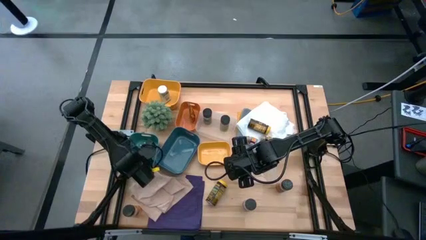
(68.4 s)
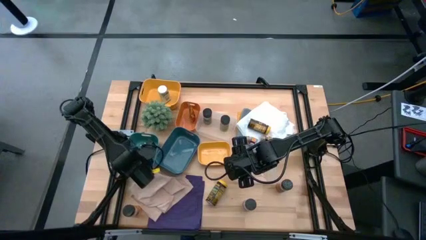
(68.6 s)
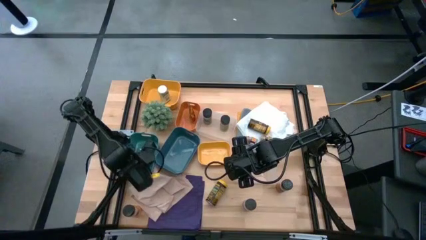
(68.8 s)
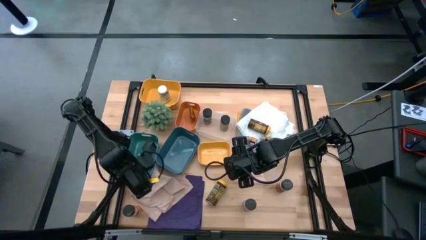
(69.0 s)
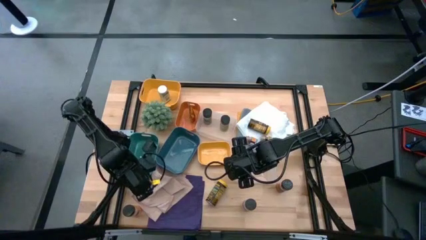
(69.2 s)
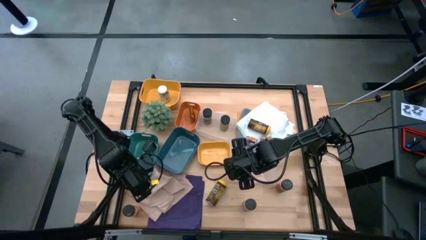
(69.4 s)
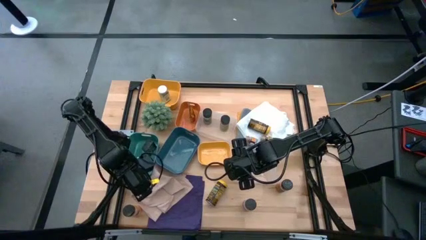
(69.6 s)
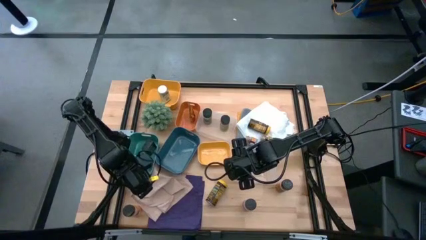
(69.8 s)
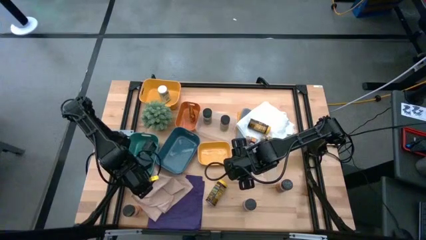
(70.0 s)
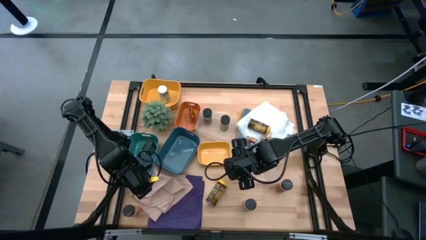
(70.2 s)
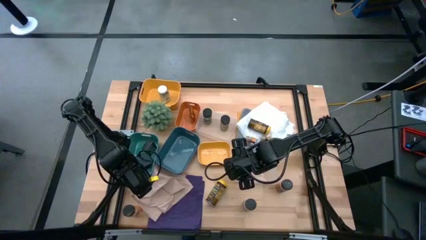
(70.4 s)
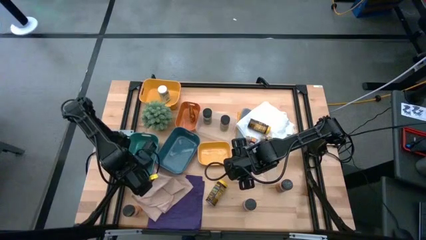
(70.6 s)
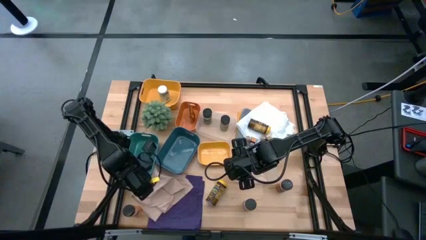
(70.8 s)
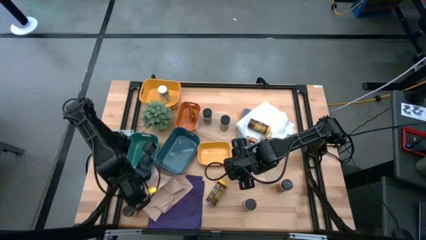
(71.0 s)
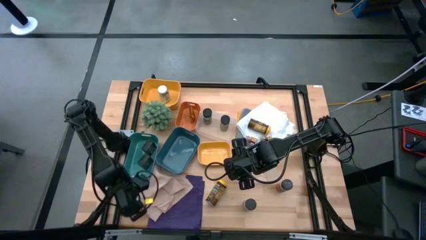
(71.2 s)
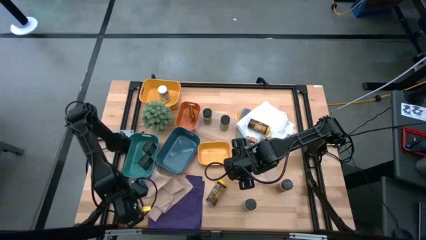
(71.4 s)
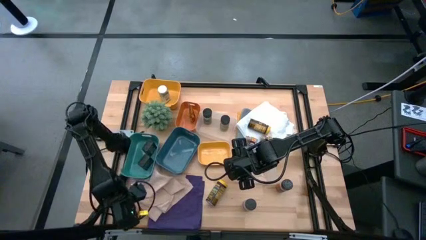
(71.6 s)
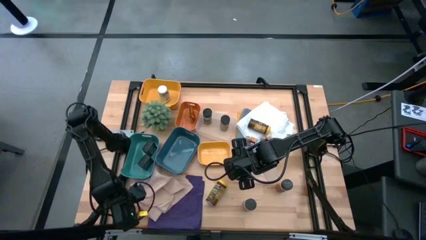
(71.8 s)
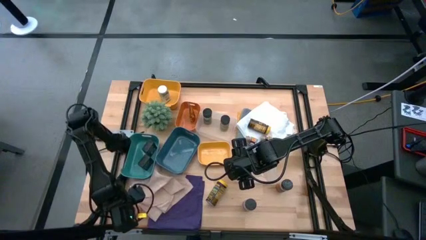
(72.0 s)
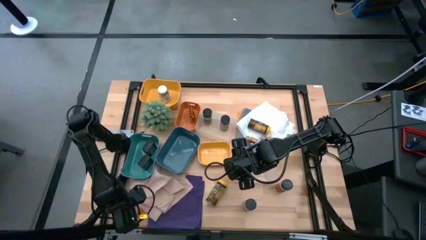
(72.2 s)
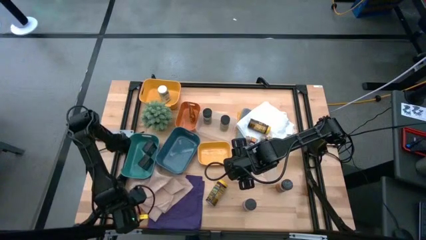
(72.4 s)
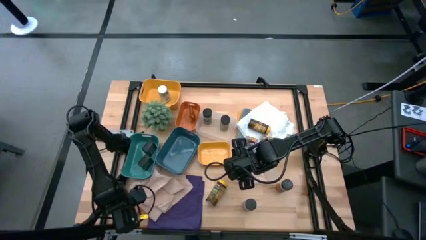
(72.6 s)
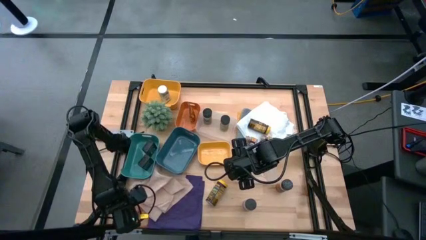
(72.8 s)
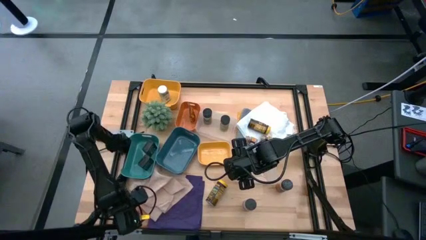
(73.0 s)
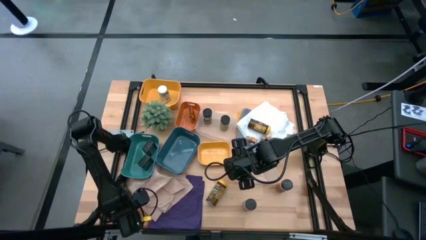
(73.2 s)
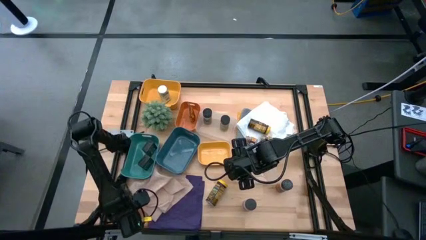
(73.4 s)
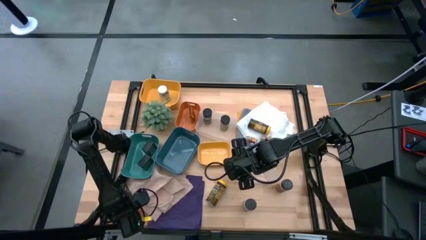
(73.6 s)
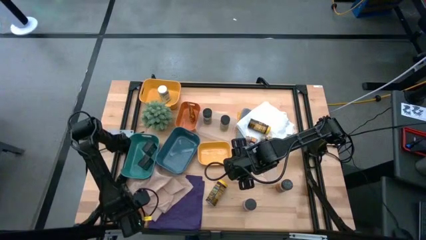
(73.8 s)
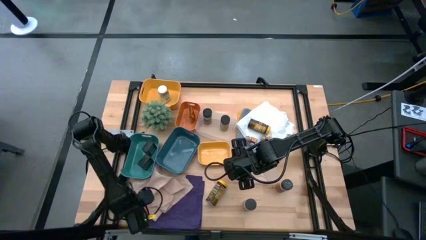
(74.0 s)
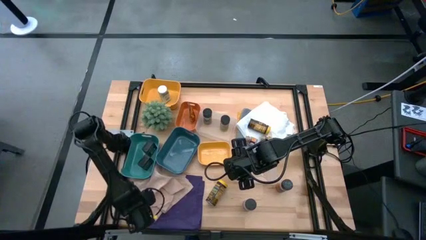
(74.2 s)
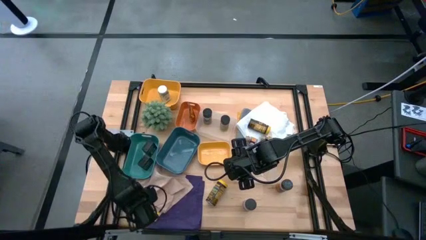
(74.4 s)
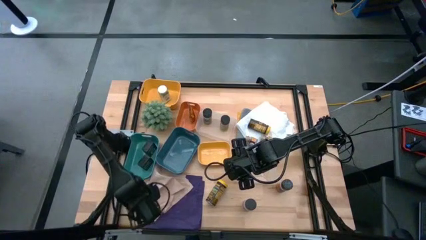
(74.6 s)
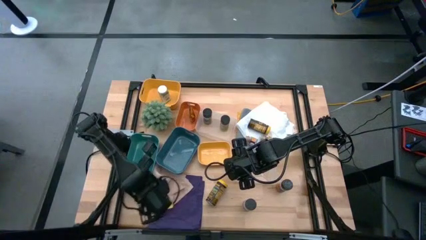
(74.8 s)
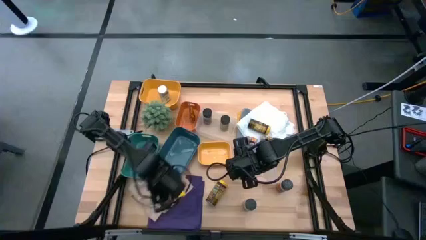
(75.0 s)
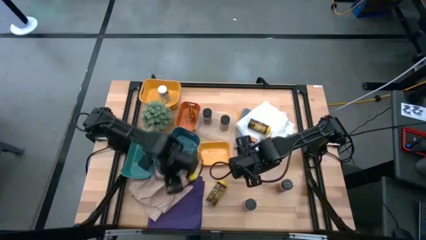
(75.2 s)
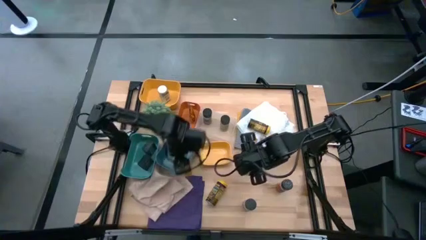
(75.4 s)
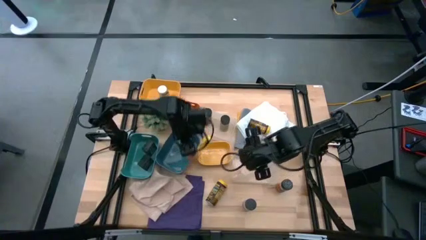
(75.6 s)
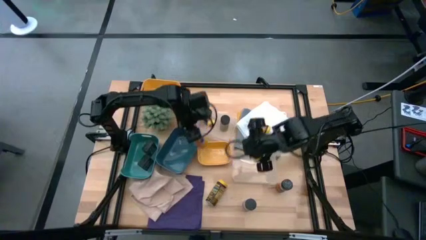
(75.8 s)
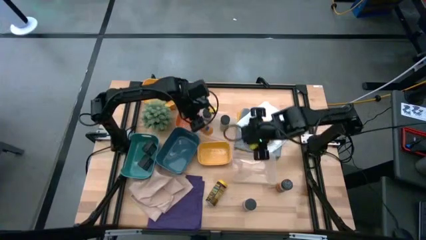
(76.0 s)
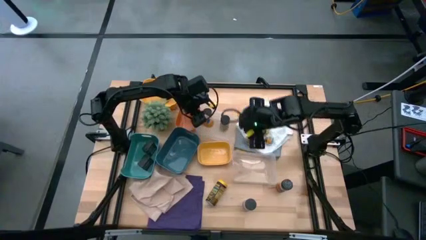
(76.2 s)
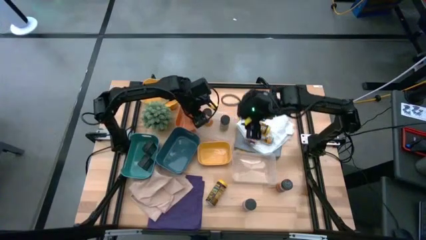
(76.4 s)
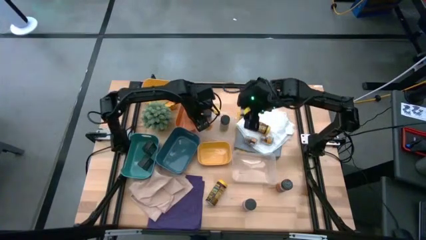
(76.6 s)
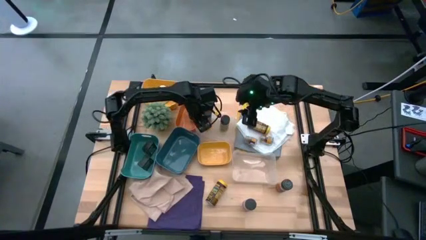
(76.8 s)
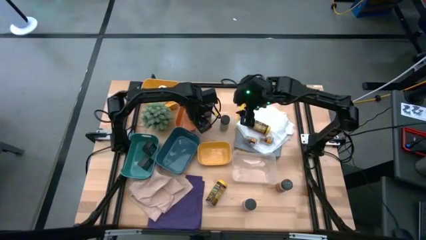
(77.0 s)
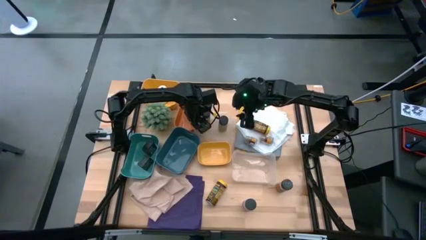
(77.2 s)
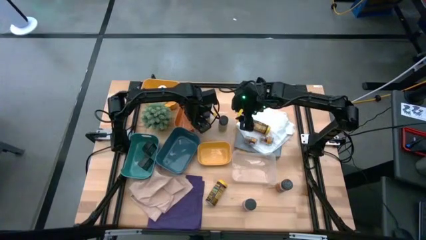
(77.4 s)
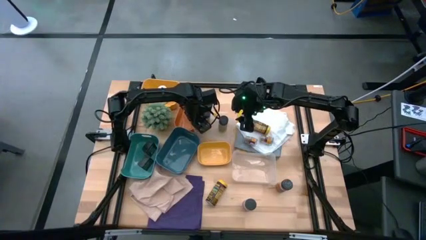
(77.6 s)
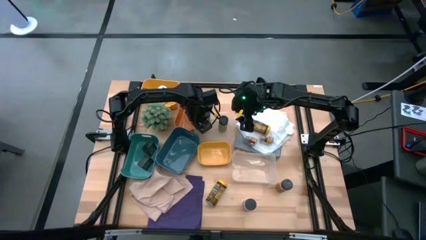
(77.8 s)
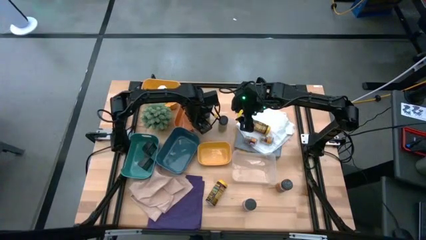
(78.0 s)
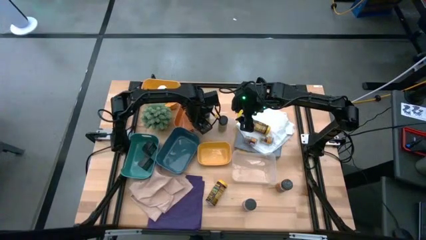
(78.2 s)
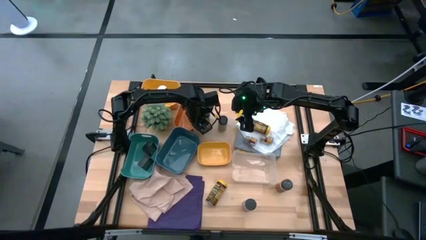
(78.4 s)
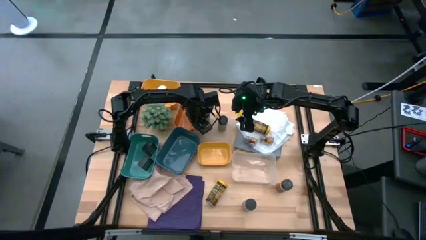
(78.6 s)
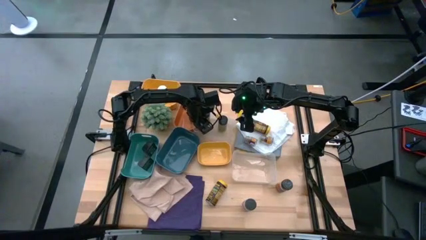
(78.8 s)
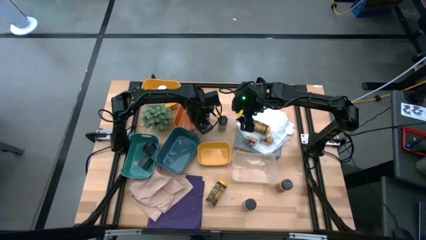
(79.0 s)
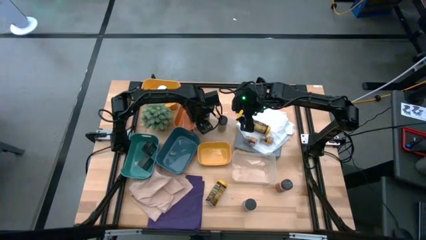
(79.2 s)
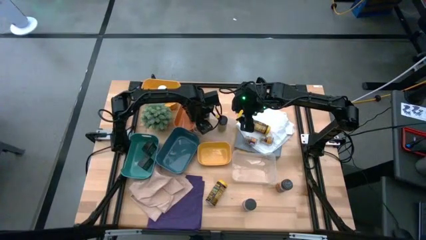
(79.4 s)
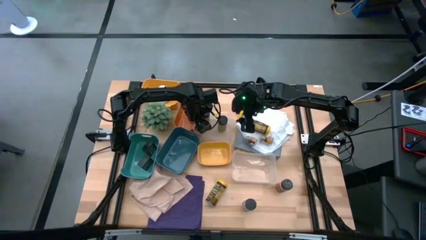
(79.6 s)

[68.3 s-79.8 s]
Task: Sort spices by type
Put the left black seasoning bottle into the transparent bin

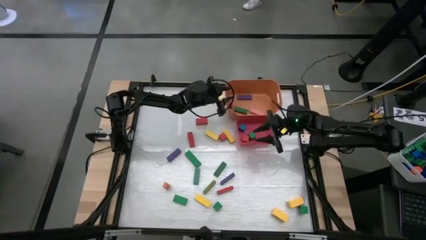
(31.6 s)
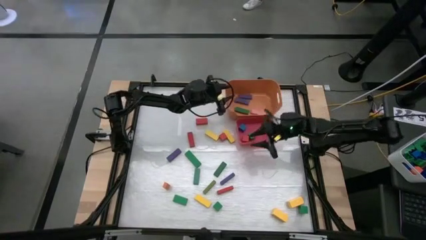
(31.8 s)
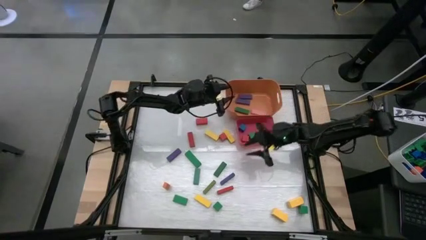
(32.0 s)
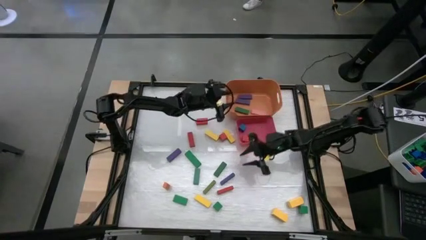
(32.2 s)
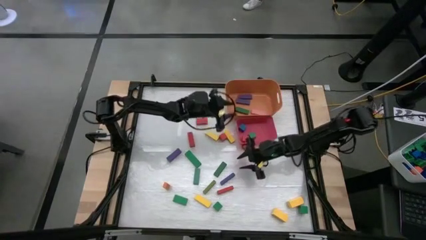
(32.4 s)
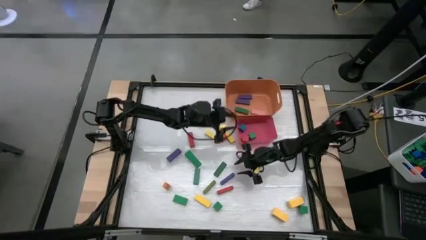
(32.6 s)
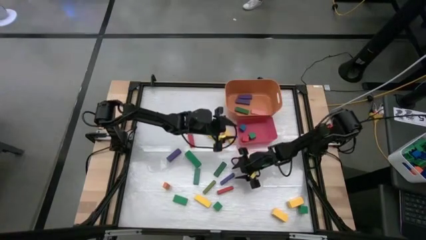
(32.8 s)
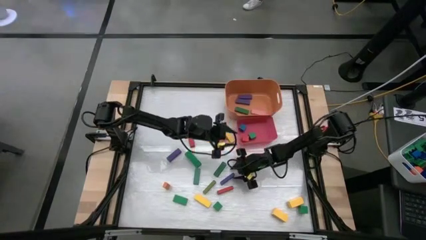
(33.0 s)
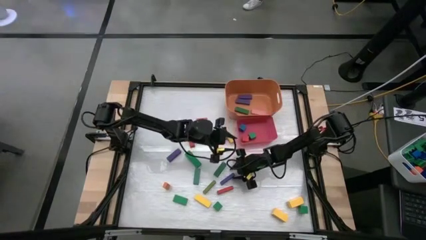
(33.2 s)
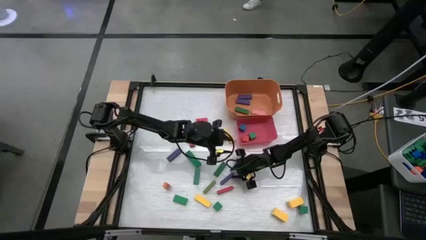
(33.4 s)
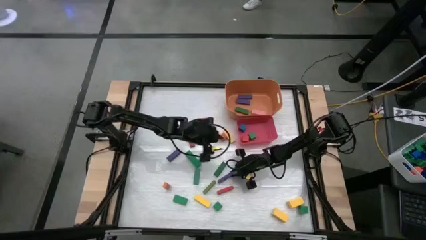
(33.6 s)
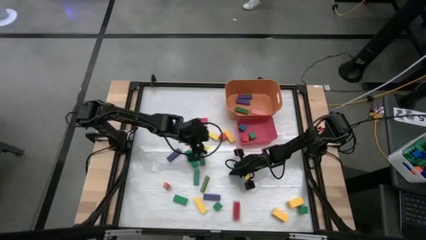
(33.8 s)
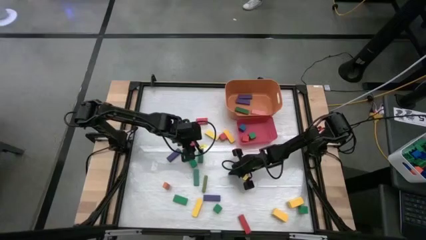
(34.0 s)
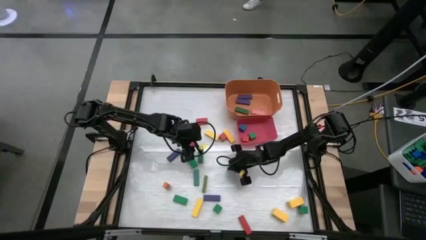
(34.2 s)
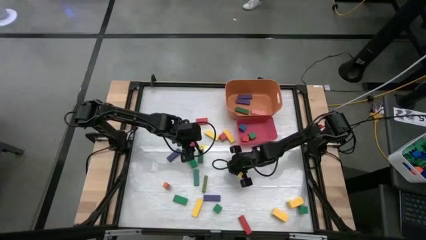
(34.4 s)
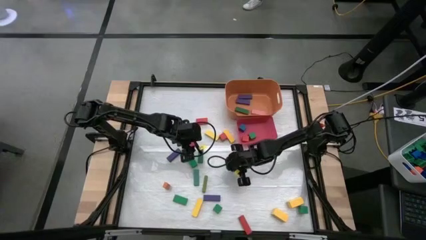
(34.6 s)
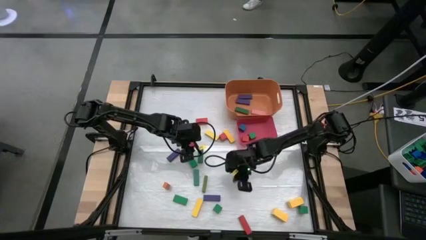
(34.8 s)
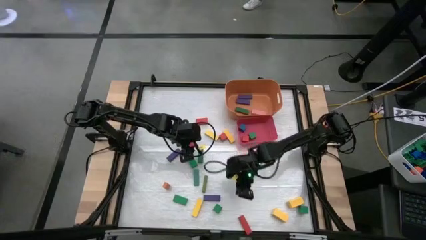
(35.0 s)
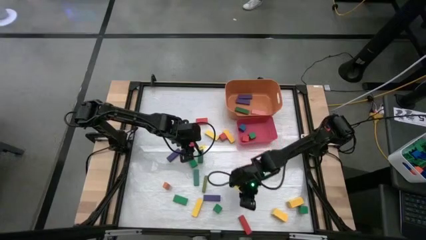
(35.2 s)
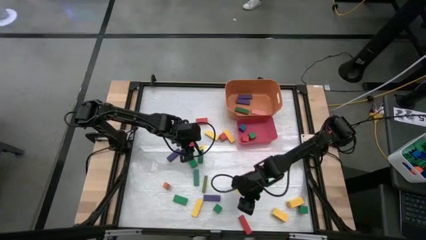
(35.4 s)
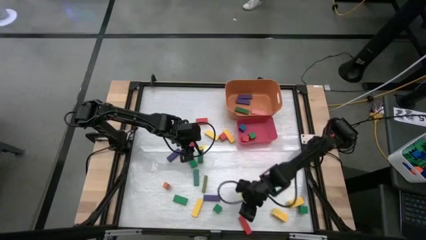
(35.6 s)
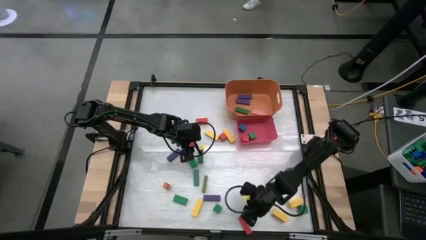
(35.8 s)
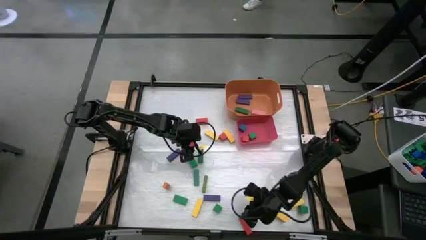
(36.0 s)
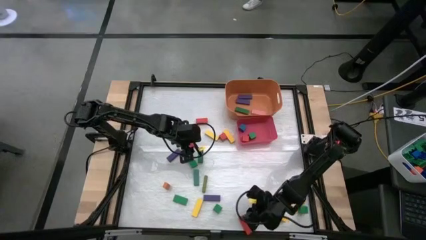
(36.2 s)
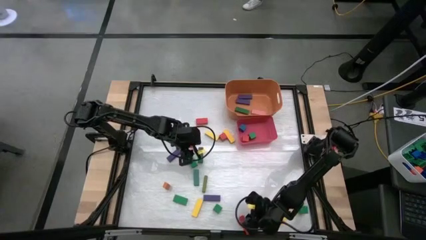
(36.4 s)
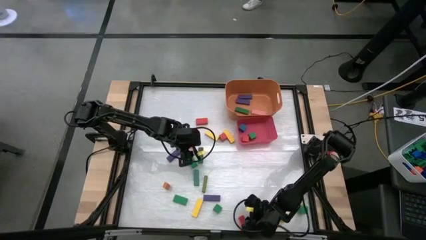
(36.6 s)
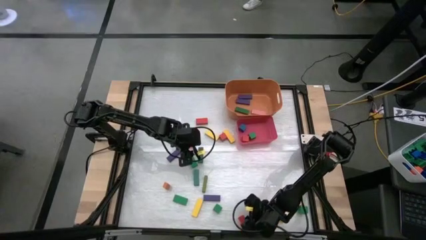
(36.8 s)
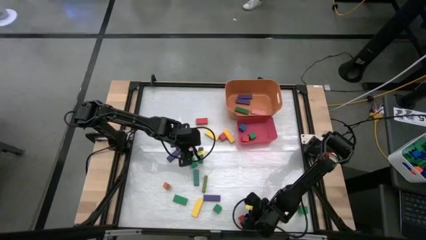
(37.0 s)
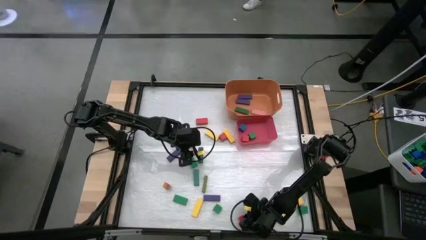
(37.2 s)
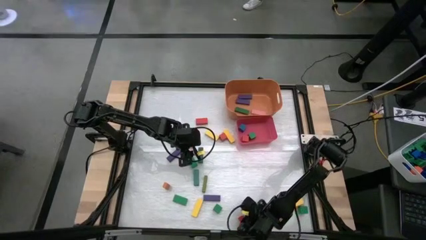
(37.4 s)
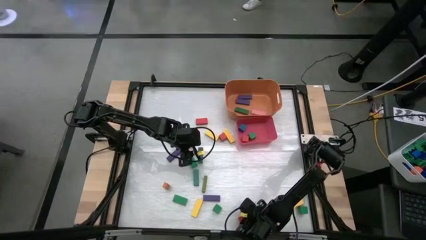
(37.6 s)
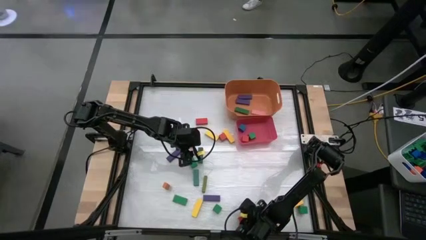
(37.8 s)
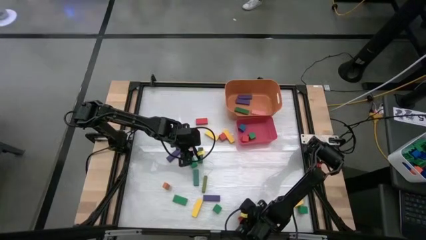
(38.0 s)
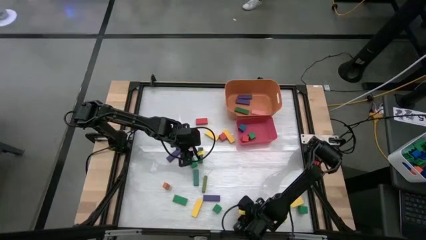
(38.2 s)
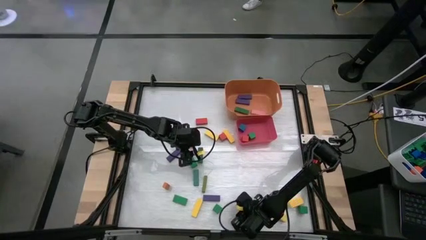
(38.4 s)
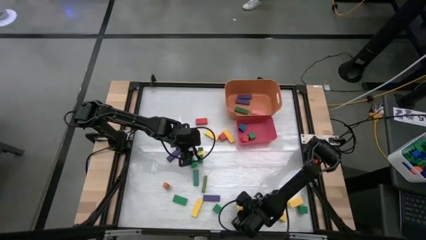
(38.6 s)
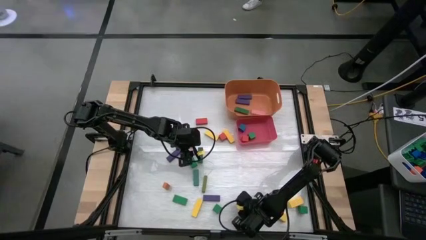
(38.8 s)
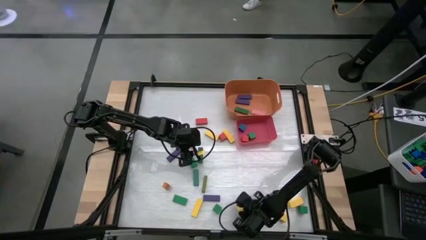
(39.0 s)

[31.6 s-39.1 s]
Task: Sort blocks by size
Put the red rectangle block into the orange bin
